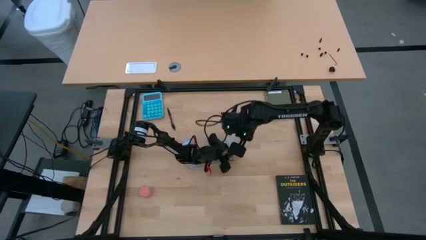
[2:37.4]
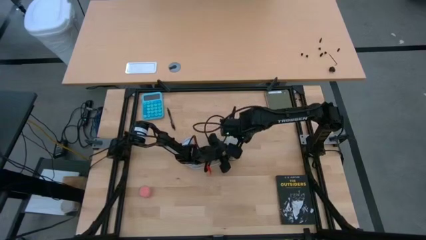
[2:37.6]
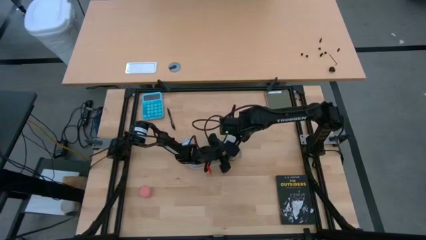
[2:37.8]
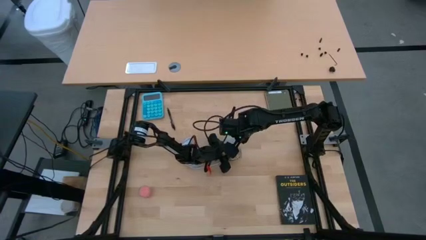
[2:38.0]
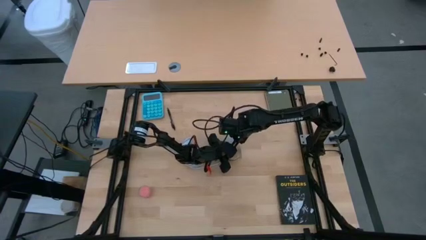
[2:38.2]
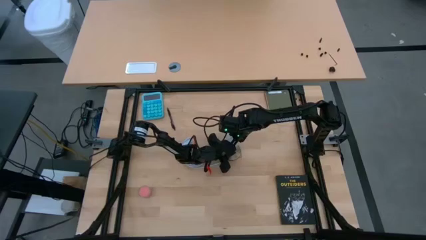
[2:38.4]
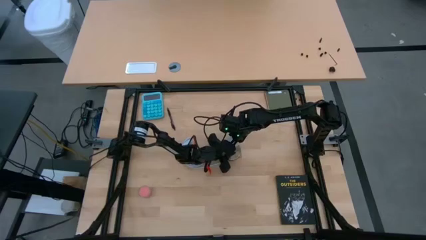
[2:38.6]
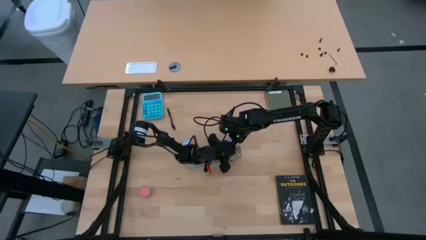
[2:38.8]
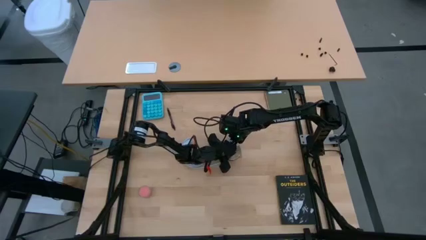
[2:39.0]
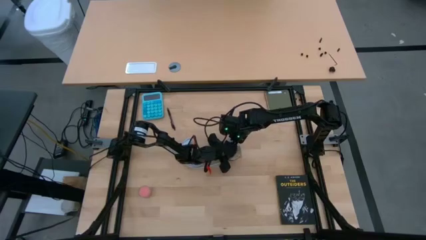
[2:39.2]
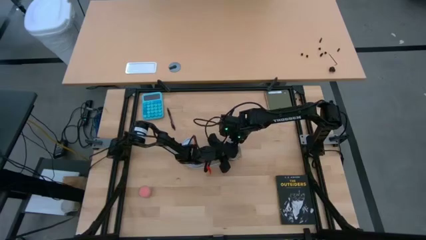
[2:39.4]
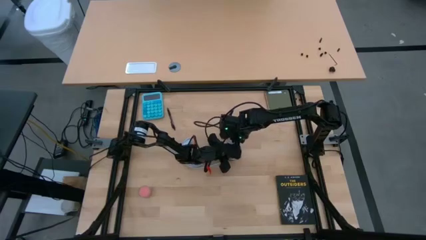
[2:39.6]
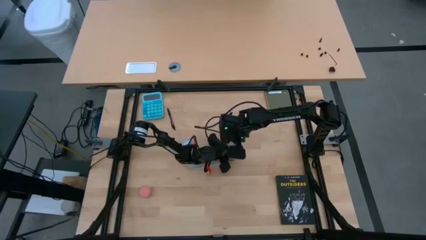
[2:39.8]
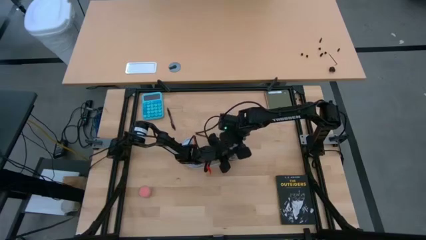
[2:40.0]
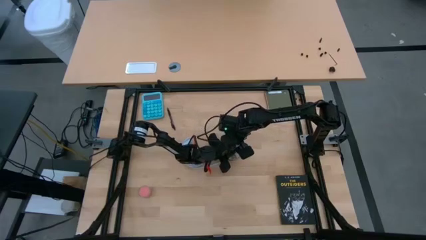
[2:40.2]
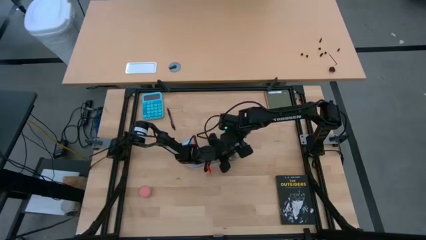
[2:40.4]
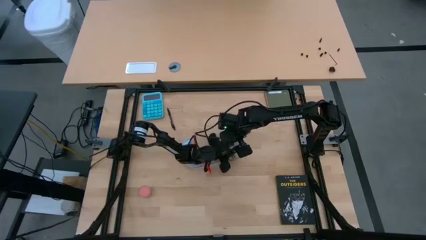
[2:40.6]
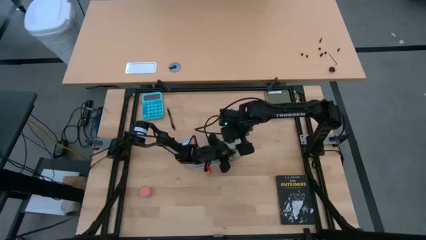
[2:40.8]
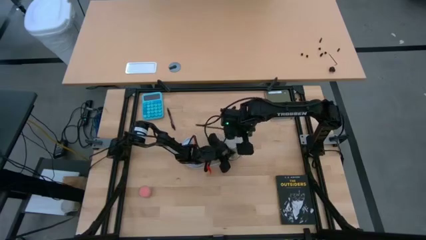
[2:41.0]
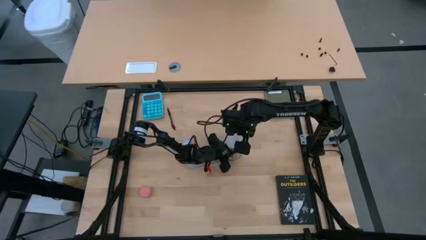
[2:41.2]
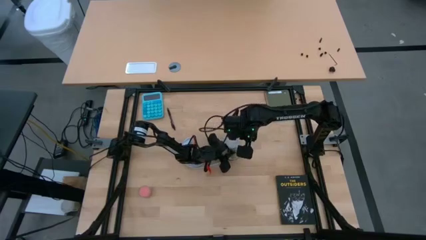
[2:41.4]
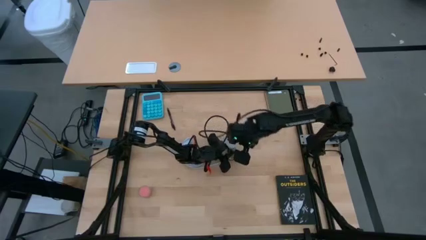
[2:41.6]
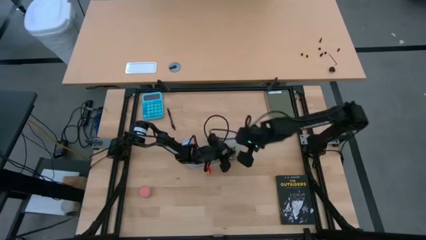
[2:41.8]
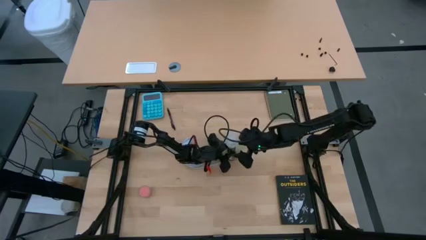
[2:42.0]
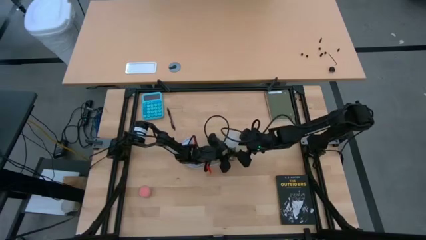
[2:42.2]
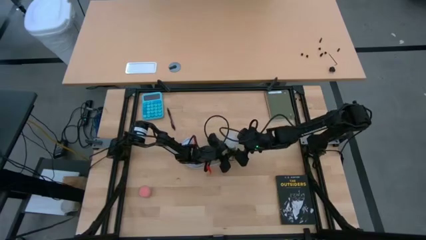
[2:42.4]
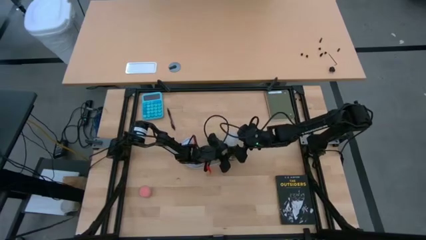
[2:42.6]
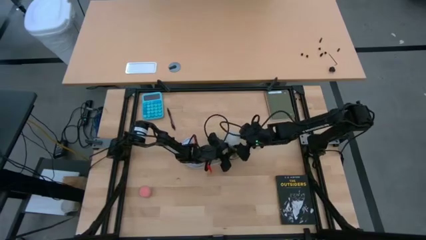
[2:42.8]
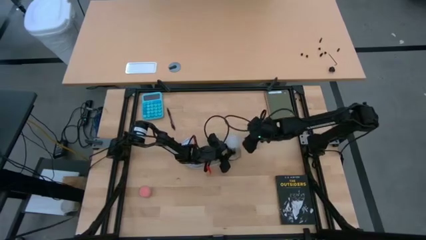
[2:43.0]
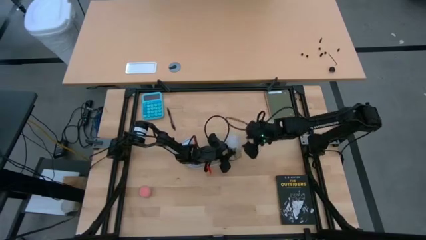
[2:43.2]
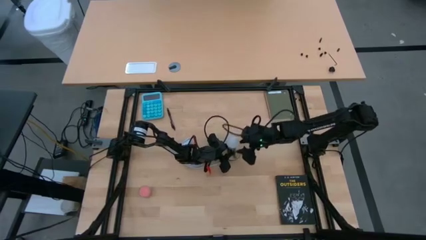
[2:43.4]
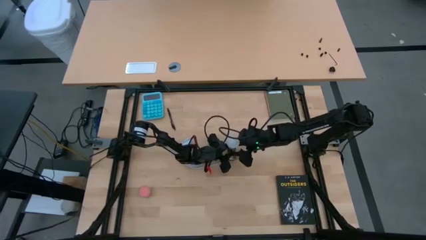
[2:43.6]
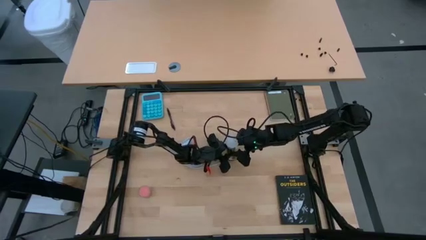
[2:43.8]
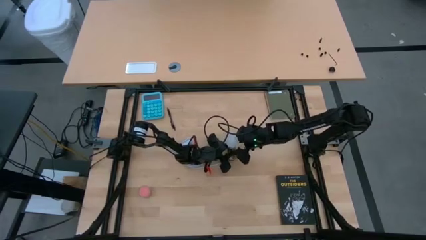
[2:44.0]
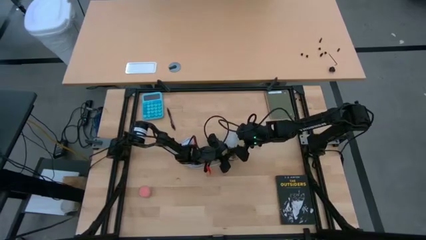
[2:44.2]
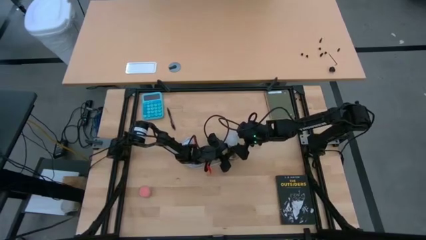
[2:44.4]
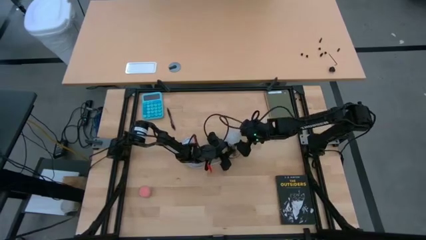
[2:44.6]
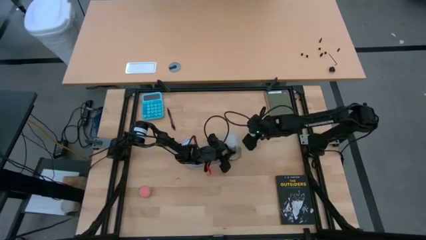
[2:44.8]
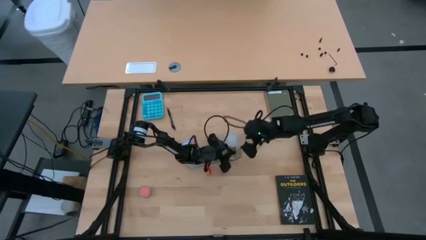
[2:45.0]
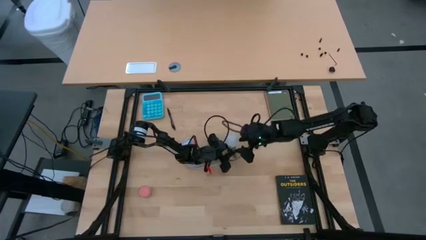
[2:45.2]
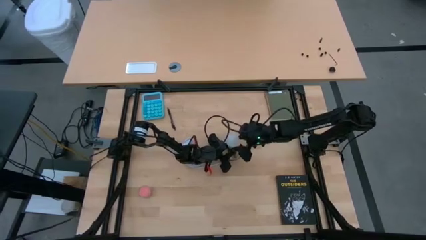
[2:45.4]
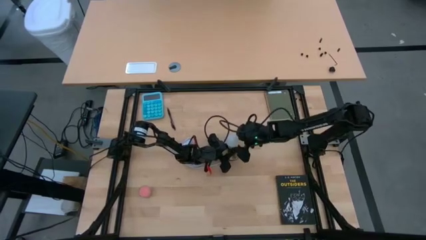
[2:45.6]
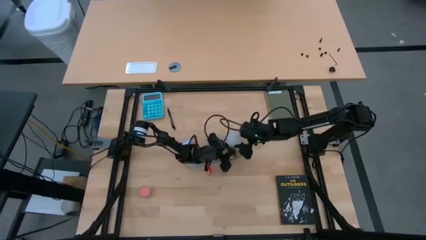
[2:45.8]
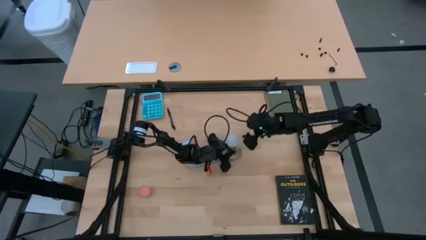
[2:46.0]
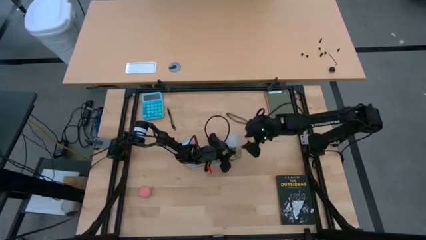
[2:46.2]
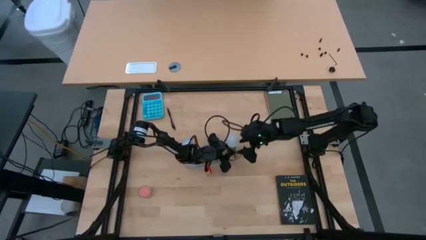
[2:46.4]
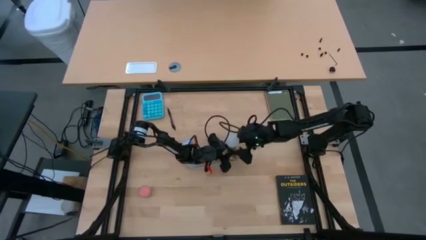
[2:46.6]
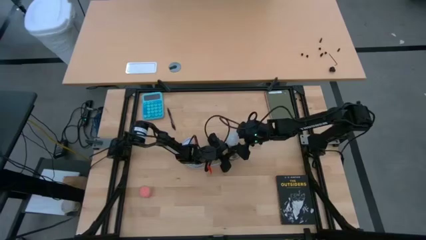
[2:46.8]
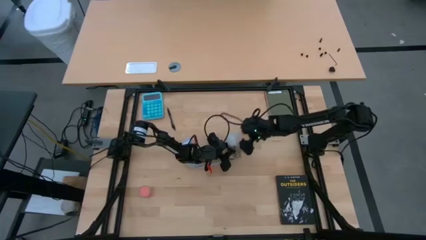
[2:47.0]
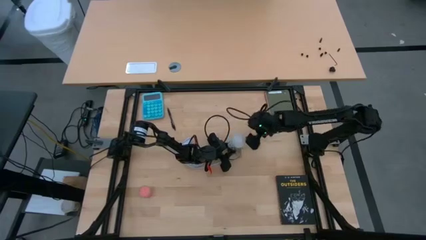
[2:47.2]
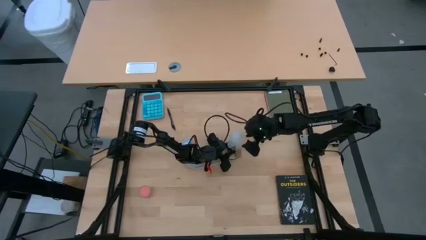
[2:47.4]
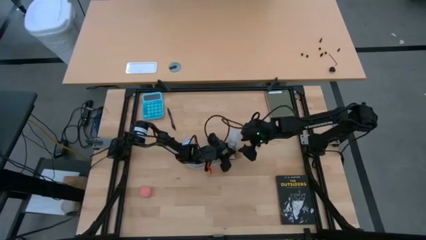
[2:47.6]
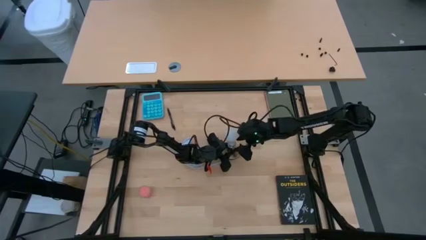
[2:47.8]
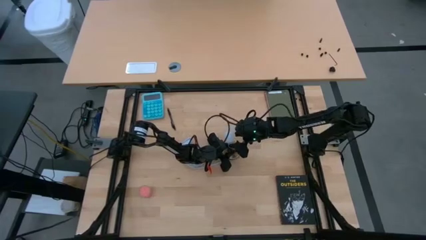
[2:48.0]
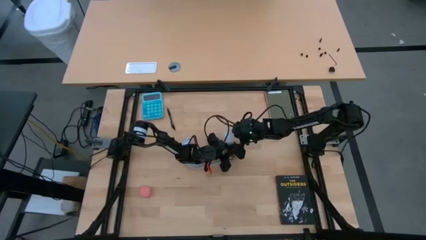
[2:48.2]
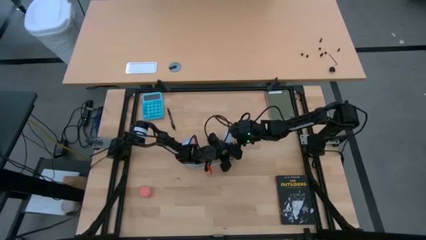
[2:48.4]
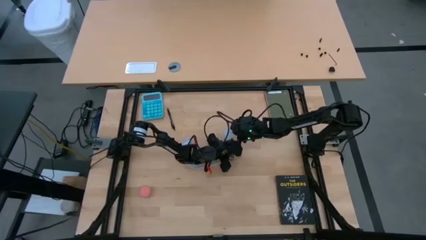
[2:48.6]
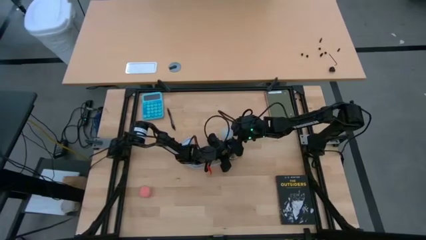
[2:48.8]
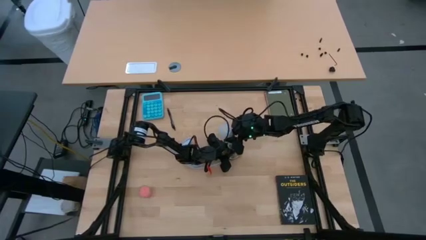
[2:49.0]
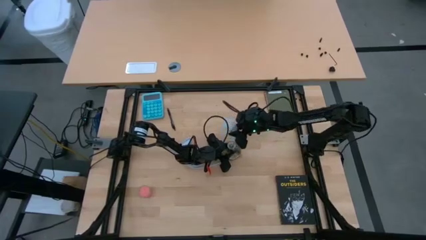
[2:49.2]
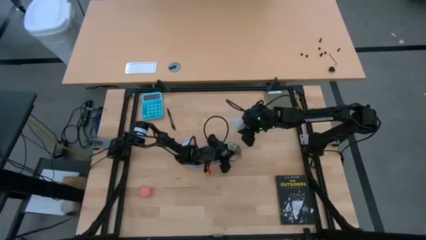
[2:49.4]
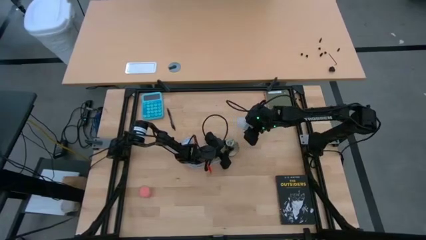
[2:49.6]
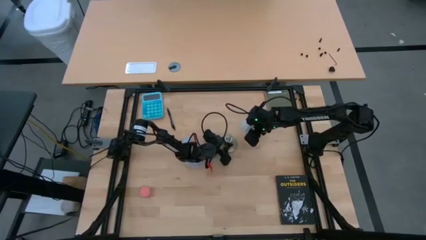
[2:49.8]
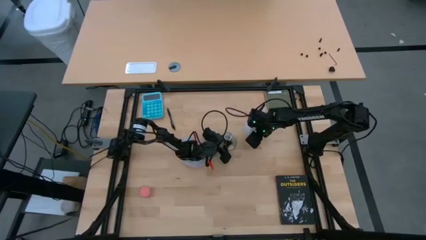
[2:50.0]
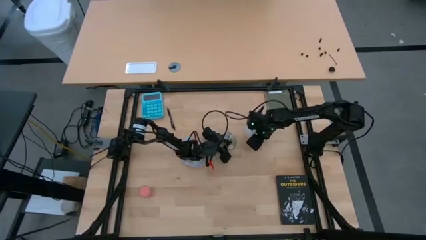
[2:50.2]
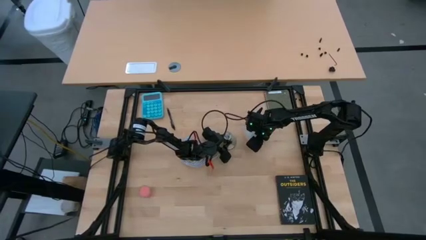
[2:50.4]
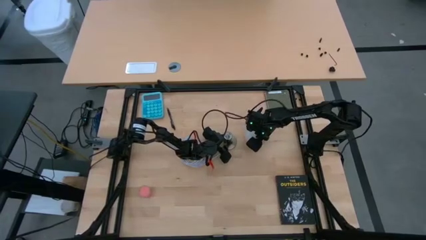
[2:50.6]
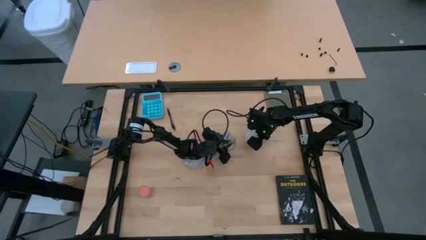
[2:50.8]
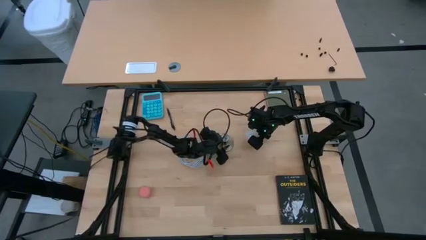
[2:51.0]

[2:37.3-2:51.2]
Task: Screw lightbulb
Remove the white lightbulb from the desk lamp

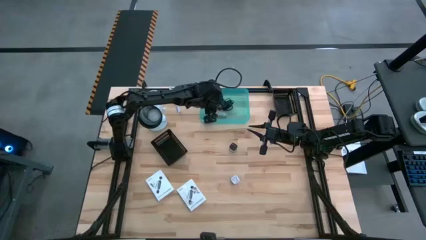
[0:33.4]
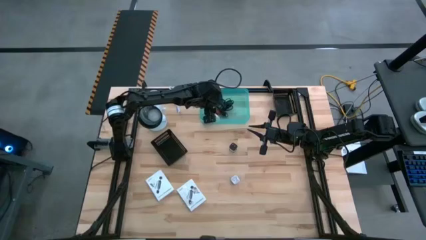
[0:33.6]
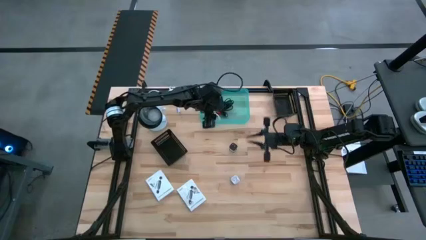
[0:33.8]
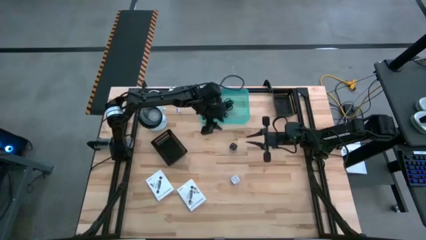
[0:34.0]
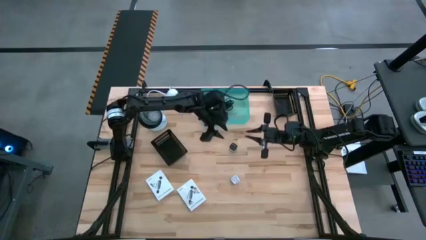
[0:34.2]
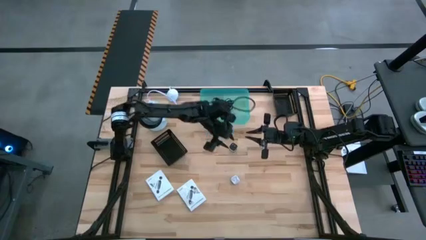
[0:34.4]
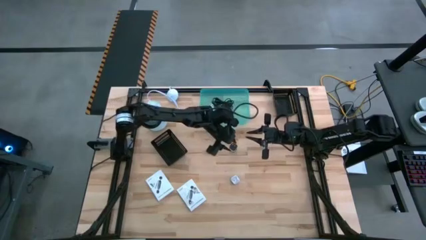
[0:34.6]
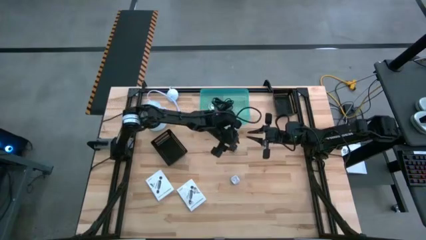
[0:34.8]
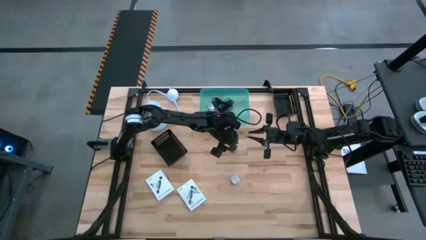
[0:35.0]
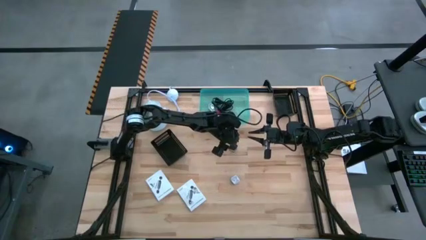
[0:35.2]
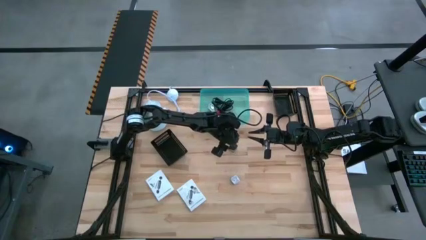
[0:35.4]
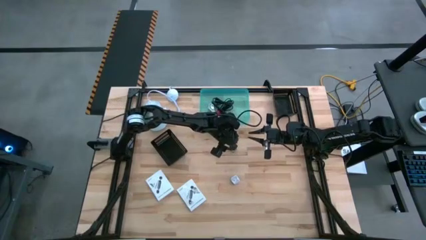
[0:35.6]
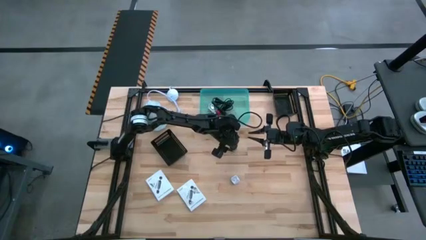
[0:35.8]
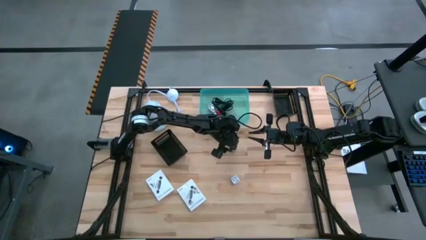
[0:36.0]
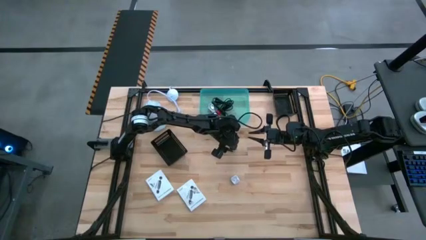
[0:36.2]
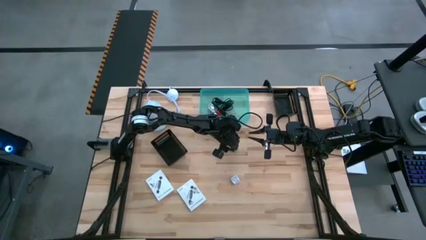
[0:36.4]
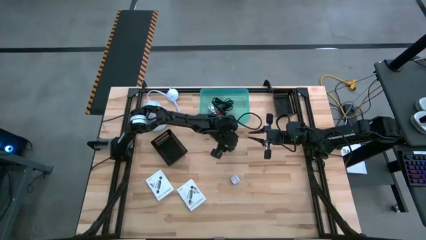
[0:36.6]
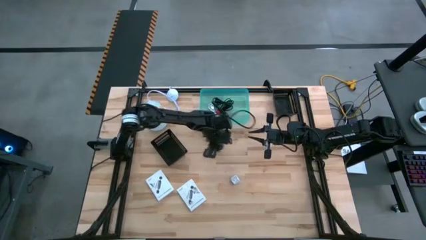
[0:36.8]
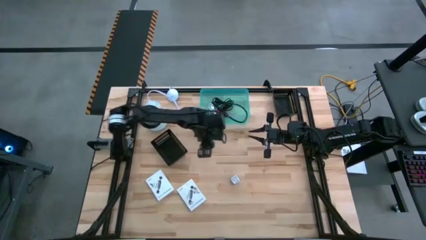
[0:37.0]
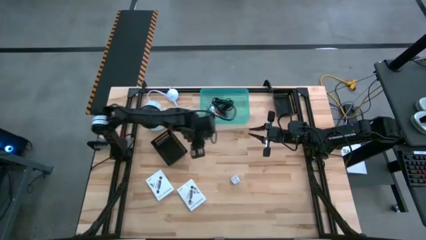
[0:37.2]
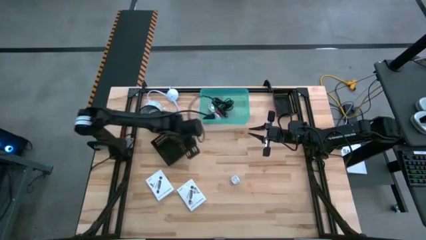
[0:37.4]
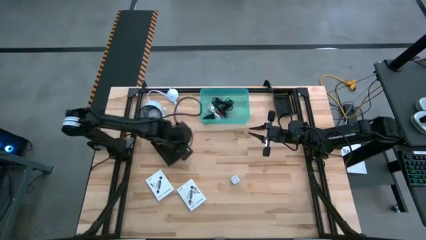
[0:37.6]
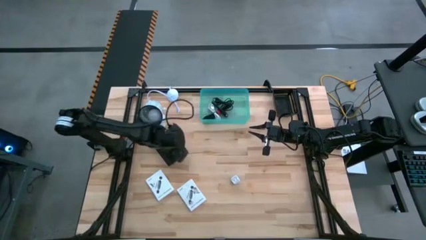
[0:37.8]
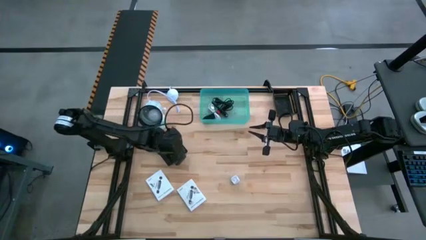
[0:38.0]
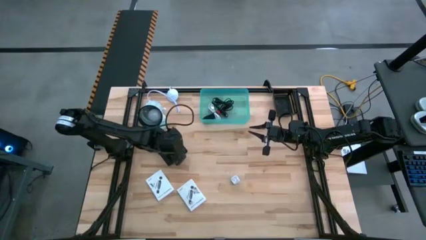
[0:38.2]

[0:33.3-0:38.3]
Task: Pick and place items into bin
Put the black charger adapter into the left black basket
